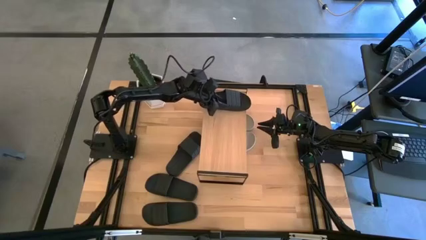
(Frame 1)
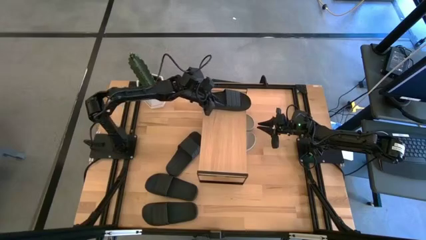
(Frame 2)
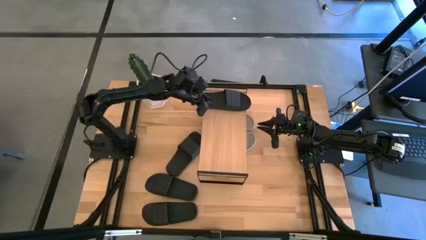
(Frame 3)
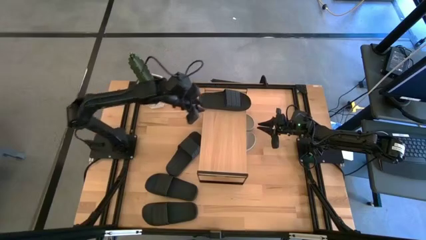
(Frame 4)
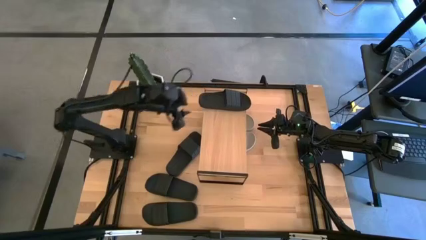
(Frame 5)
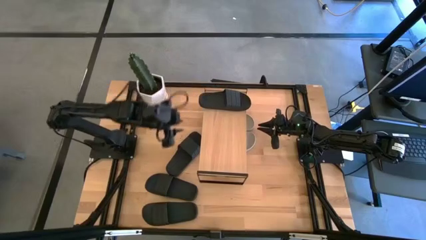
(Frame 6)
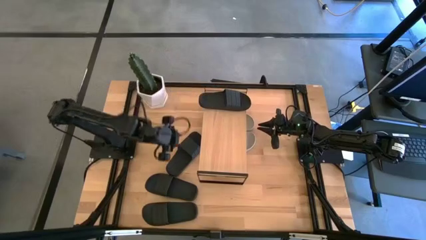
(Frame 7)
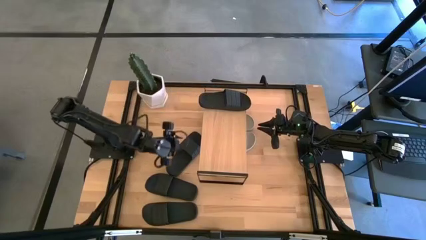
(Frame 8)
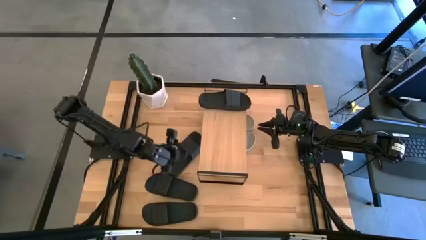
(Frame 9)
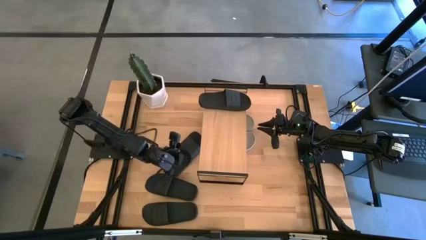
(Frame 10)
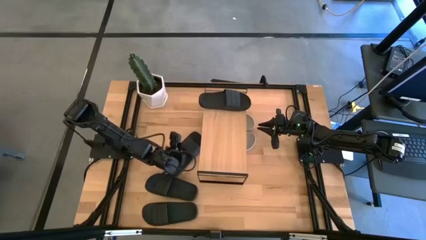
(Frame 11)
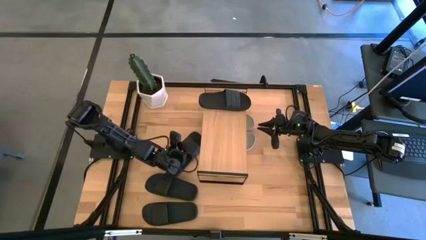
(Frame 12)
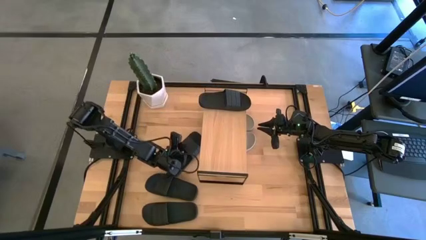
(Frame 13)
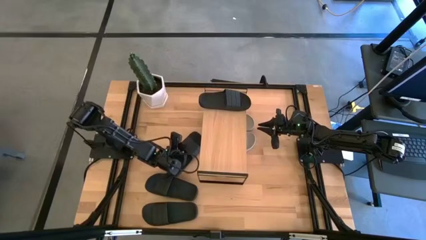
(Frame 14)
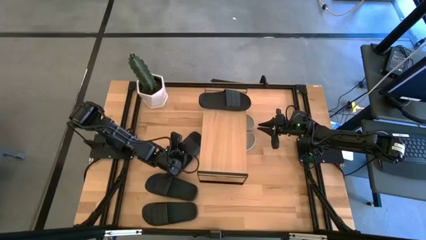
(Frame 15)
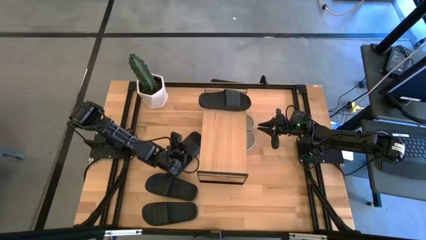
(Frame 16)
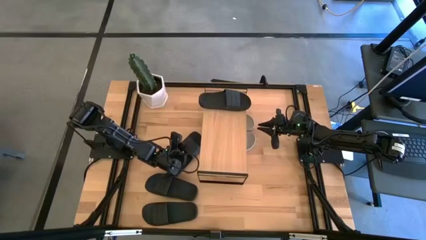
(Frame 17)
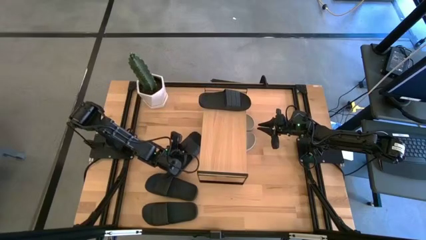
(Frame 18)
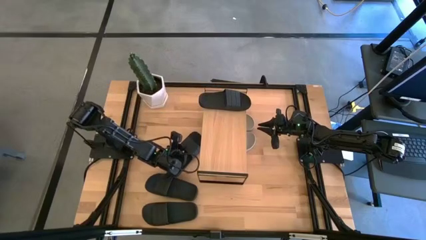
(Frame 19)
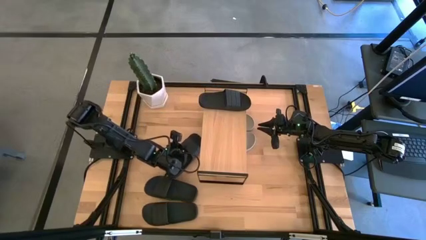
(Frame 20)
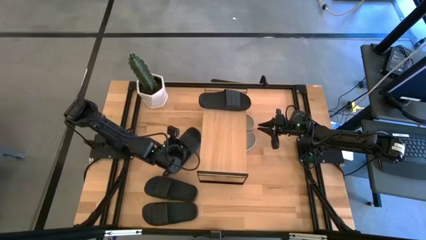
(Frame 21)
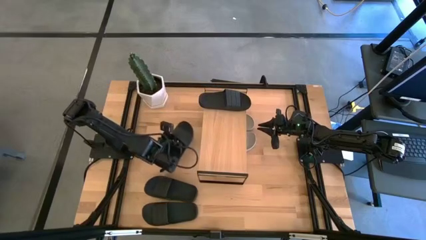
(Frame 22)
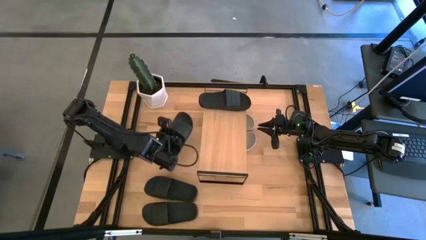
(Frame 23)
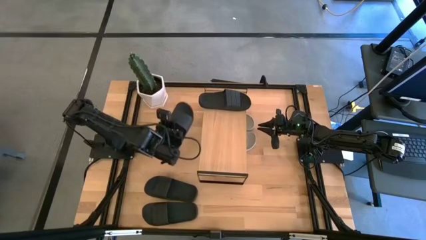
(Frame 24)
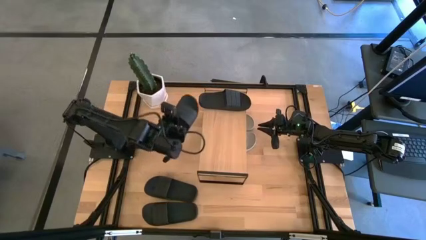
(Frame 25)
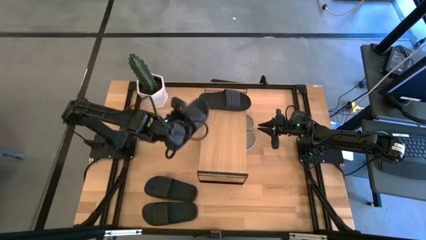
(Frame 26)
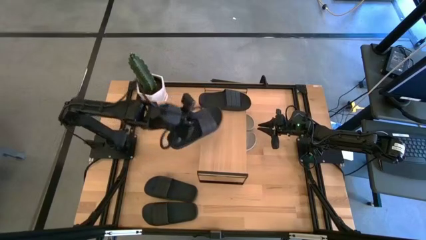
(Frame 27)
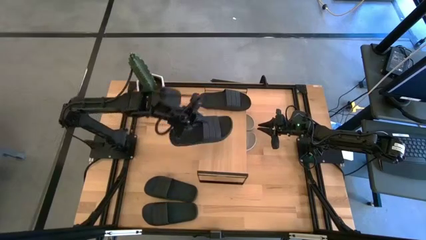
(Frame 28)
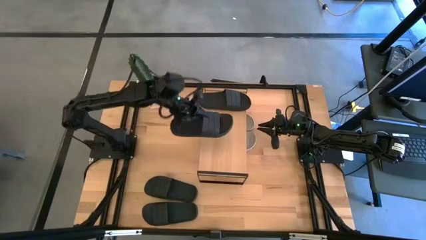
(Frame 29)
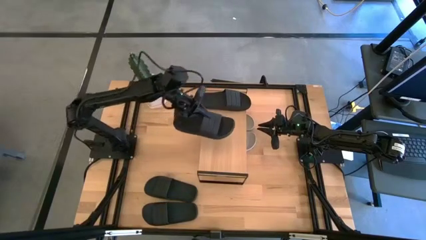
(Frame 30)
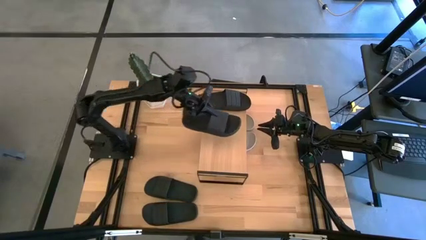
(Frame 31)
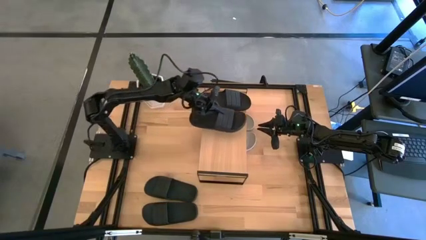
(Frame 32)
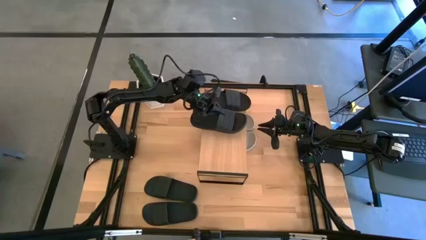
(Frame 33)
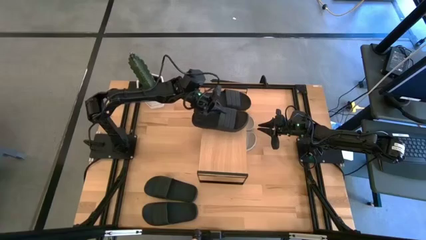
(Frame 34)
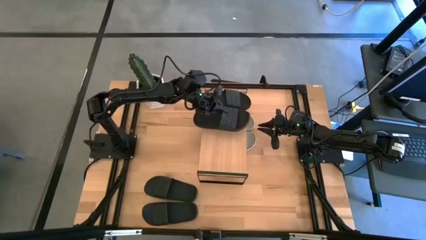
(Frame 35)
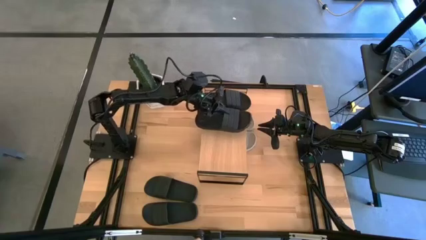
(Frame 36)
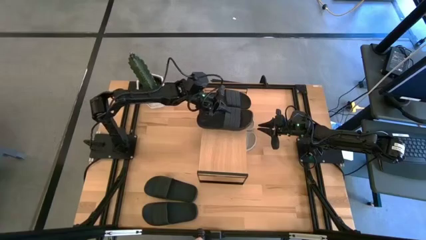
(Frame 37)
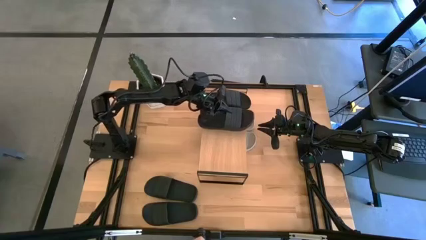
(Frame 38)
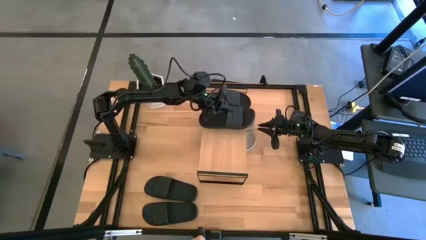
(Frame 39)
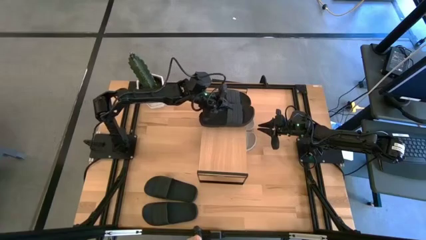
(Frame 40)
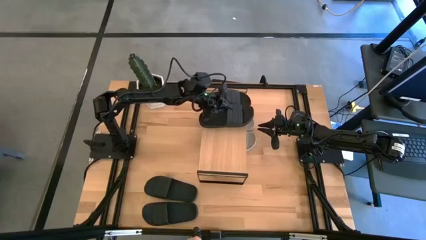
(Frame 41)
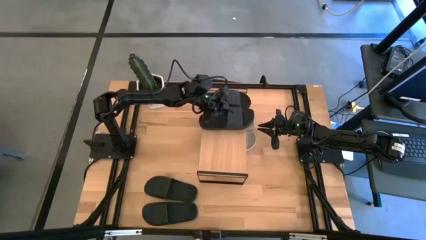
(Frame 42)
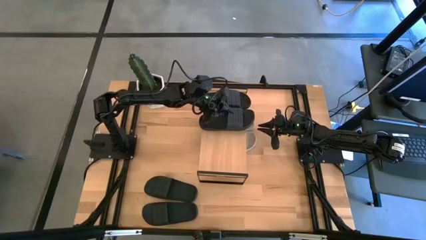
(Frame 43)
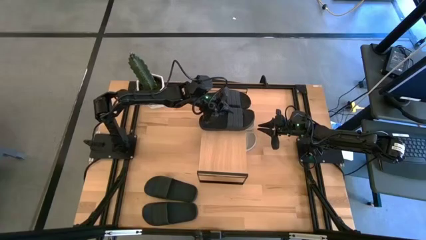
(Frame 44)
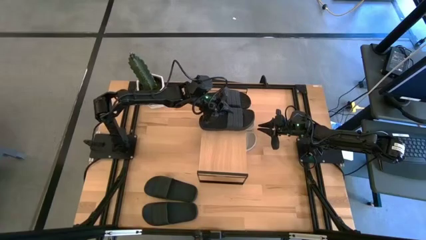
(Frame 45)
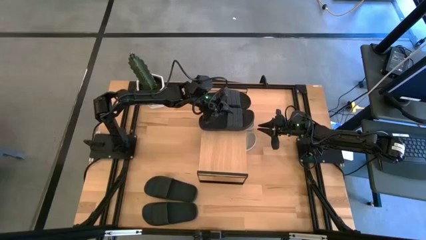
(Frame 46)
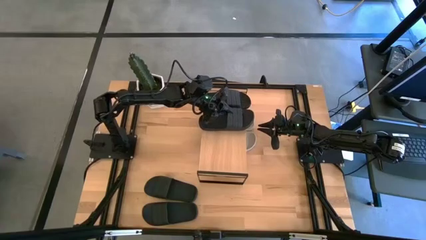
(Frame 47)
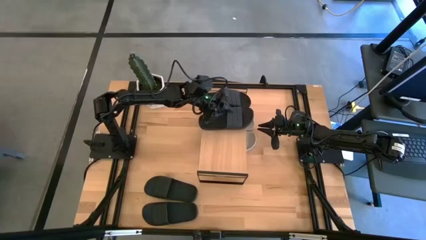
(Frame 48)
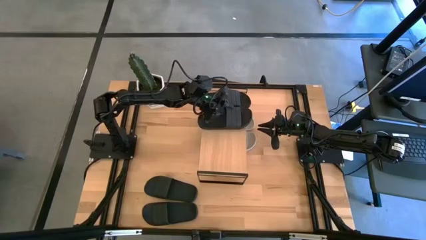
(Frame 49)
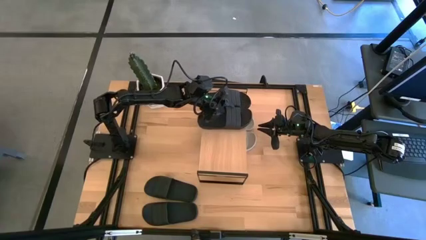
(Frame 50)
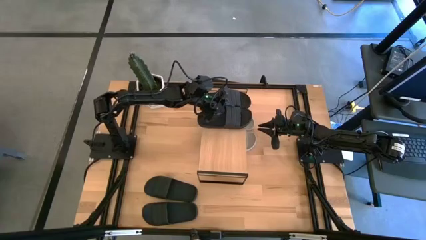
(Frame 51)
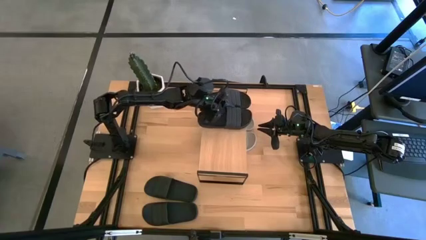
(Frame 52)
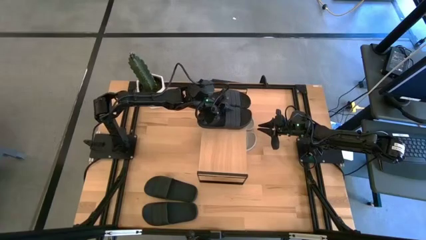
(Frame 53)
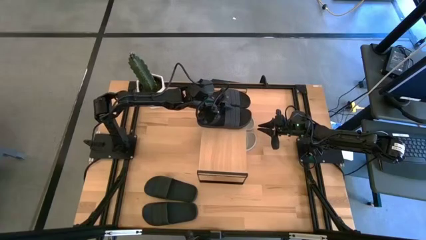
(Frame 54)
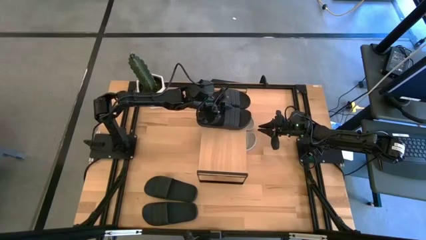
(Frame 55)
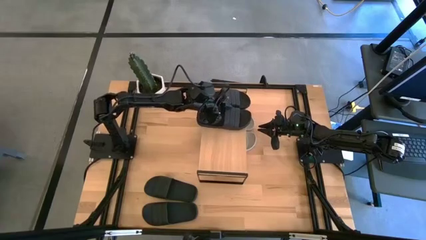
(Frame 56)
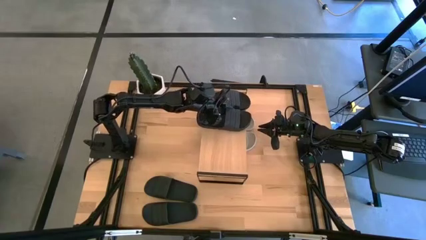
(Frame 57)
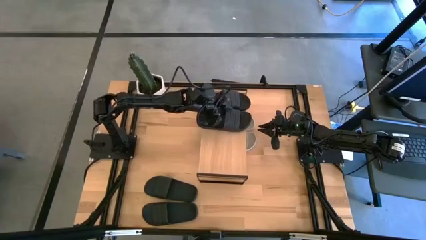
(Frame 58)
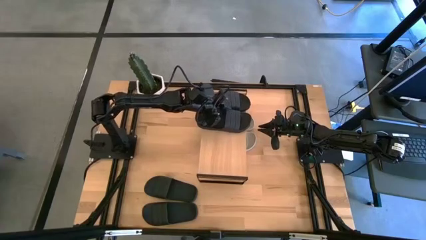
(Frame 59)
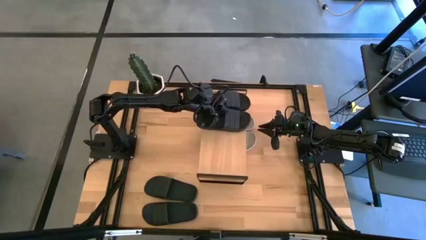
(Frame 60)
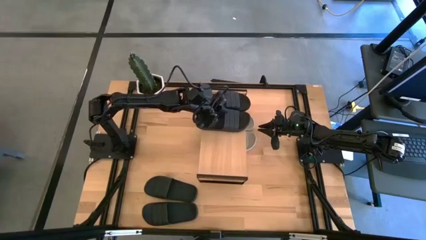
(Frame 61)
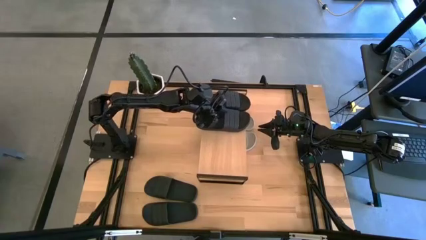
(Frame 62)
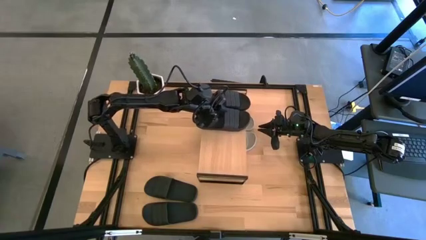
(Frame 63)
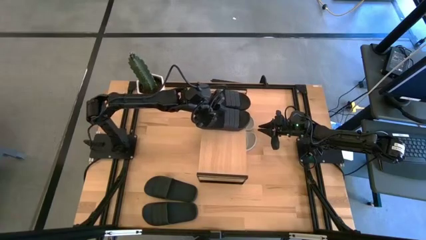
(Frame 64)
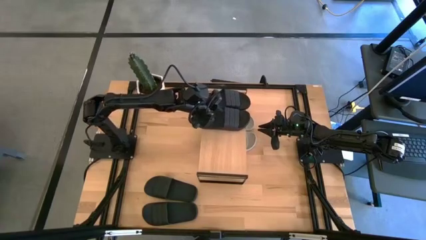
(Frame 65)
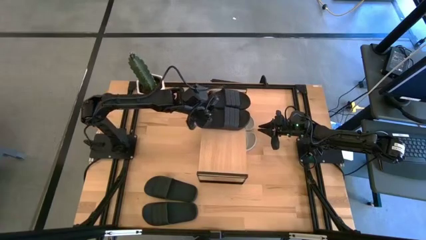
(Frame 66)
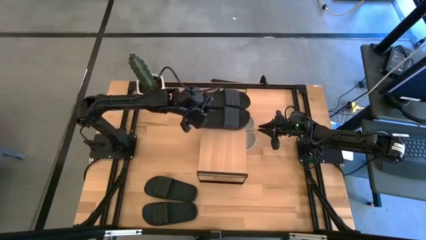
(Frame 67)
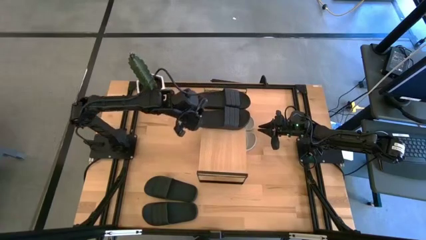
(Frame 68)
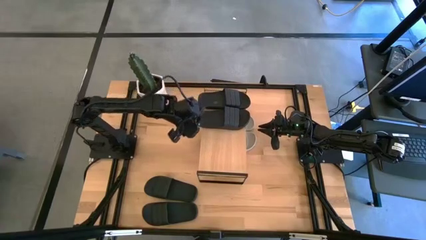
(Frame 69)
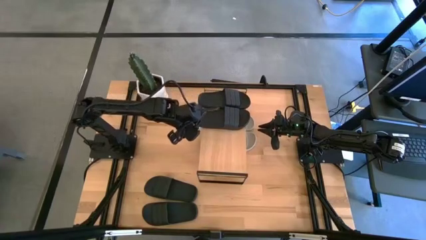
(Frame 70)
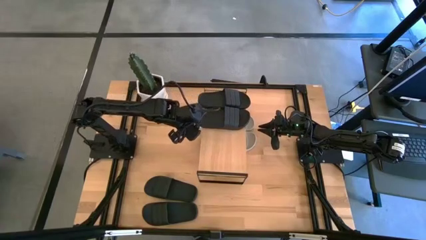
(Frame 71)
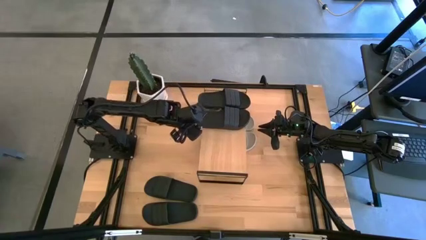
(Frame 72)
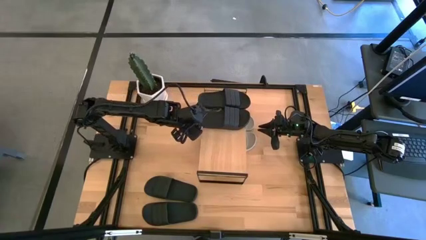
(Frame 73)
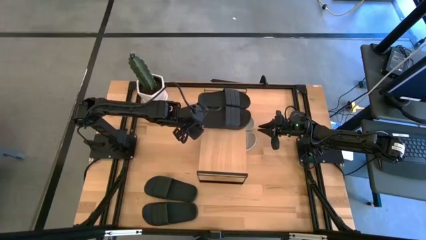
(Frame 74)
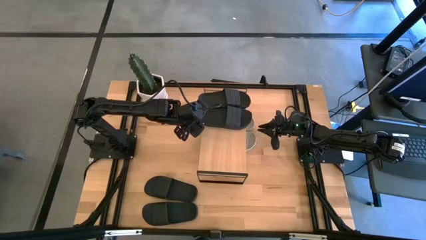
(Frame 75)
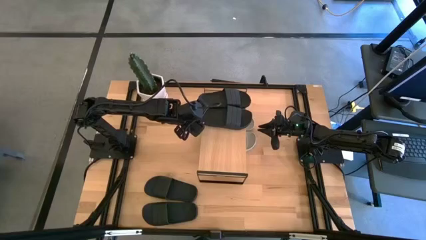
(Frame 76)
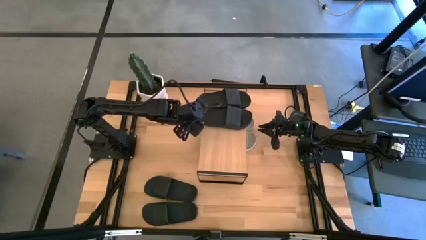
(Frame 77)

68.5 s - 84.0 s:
Task: Pick and place slides into the shelf
Put the black slipper on the shelf

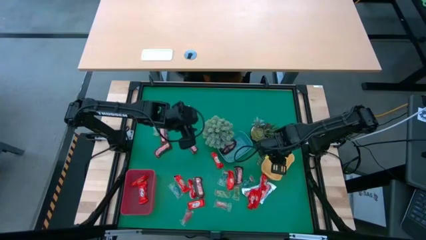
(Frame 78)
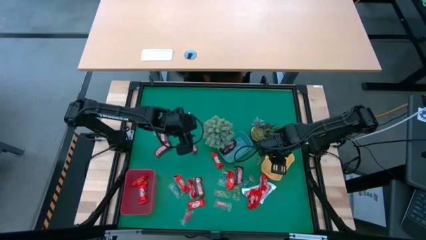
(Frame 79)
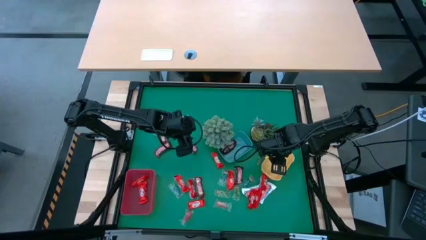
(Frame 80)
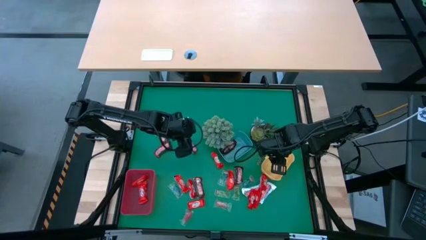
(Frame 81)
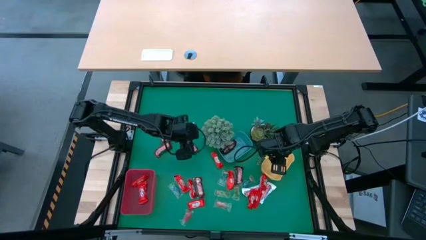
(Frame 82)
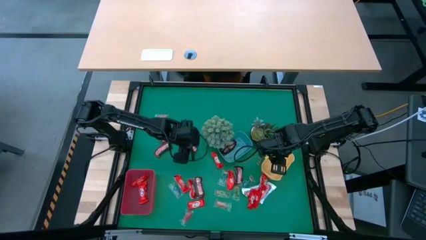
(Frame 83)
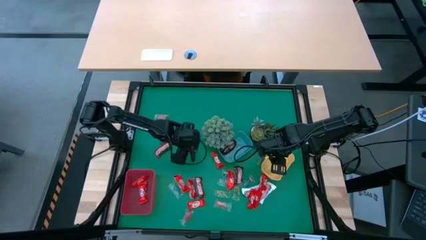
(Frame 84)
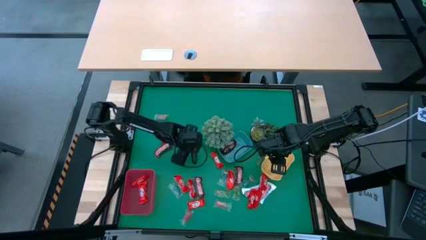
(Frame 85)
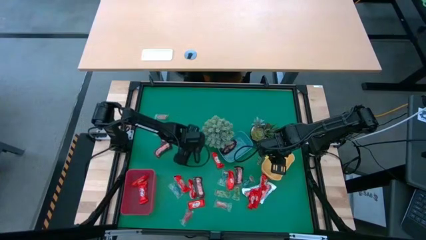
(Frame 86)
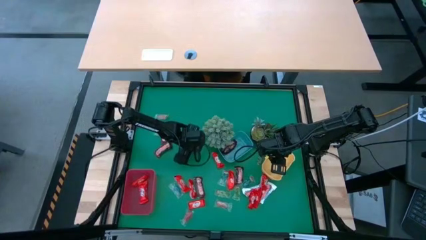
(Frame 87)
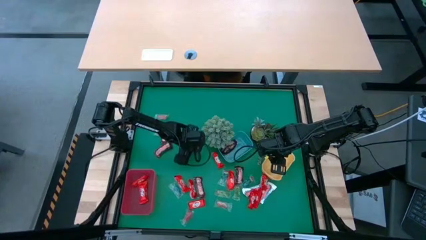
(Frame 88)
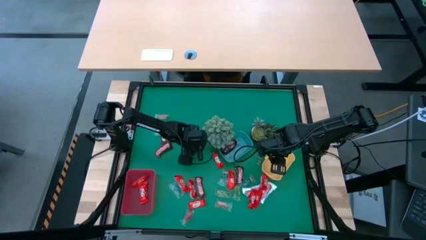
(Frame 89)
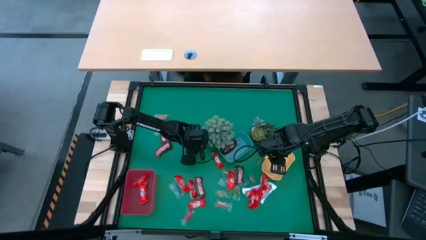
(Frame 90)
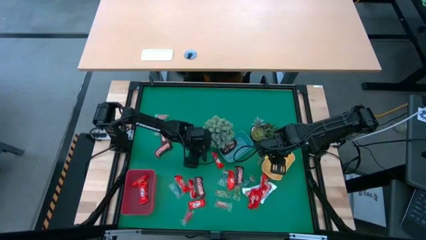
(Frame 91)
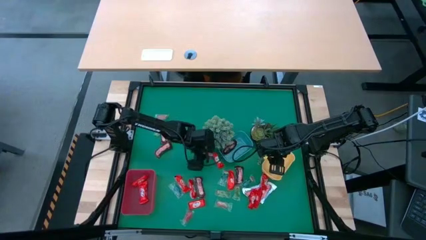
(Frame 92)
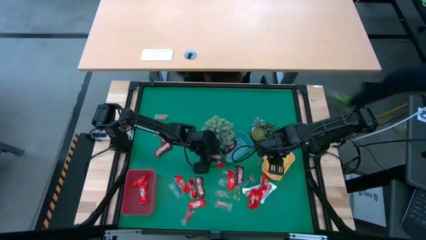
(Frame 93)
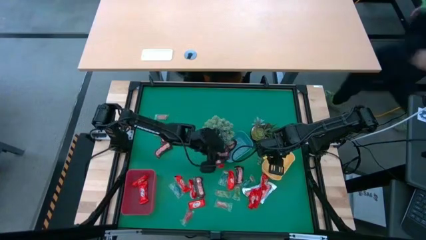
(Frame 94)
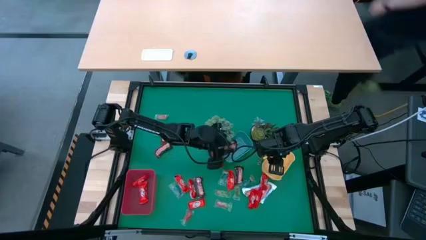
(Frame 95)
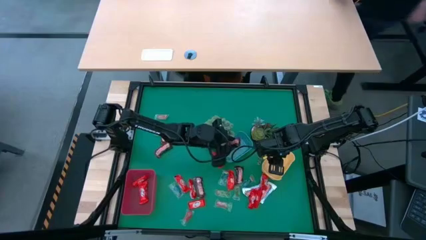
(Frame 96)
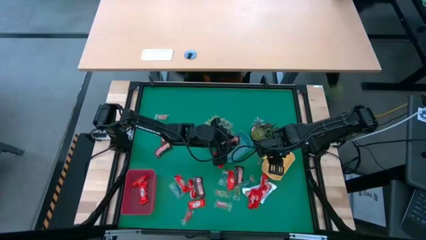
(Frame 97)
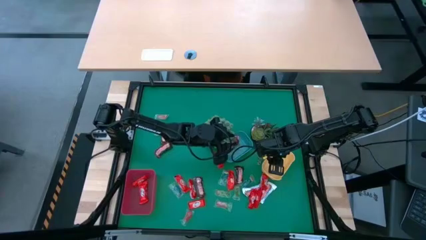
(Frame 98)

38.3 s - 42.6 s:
Task: Organize candy in baskets
Put the brown chocolate into the blue bin
